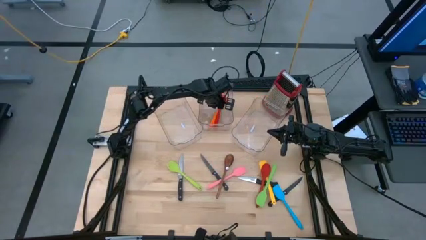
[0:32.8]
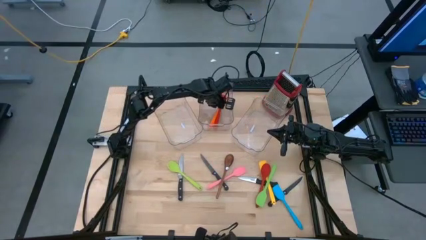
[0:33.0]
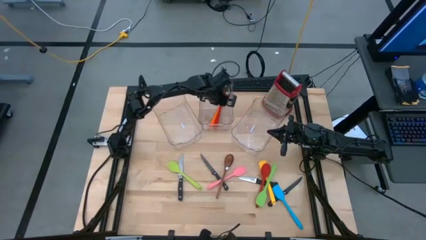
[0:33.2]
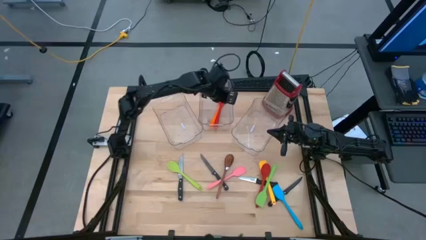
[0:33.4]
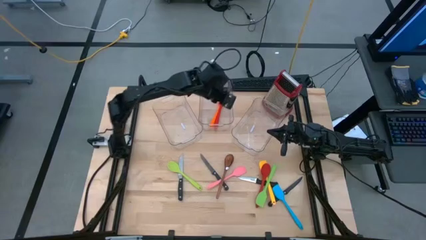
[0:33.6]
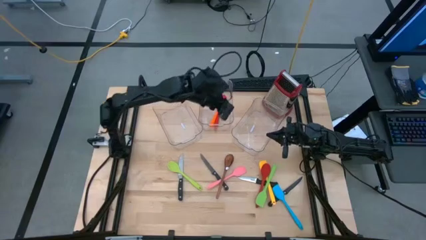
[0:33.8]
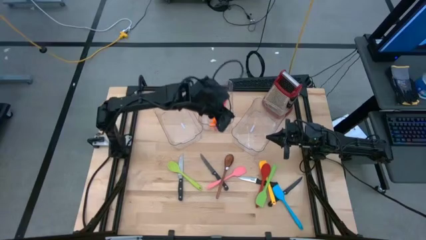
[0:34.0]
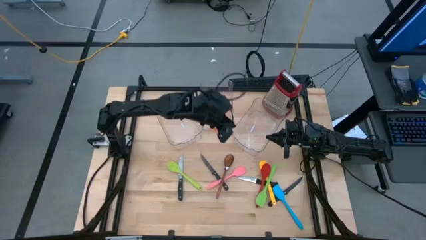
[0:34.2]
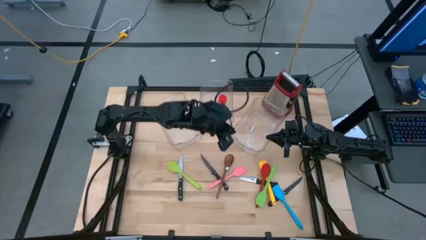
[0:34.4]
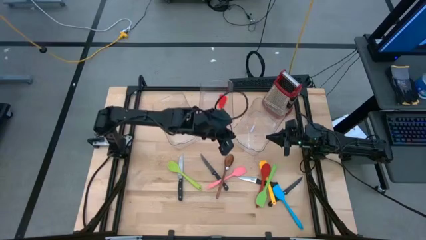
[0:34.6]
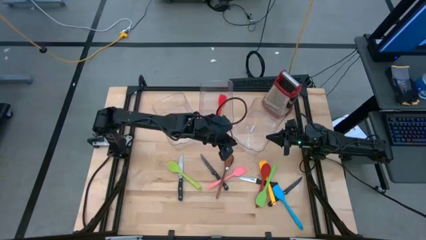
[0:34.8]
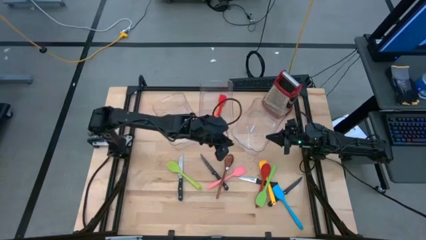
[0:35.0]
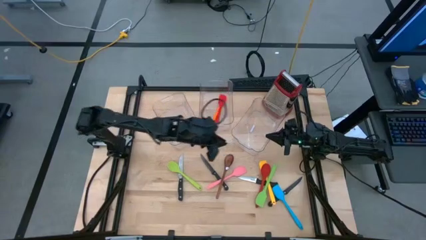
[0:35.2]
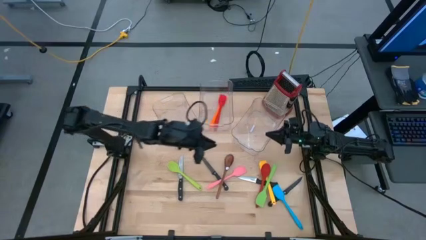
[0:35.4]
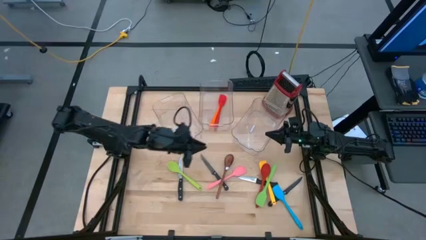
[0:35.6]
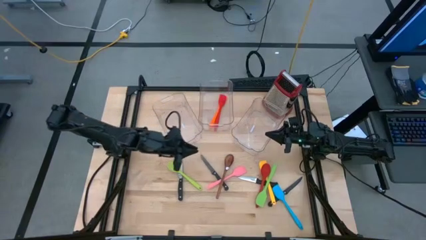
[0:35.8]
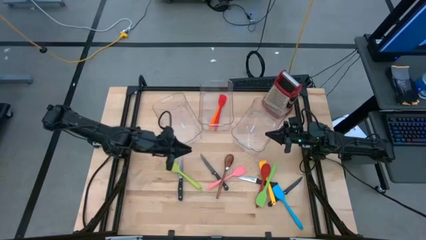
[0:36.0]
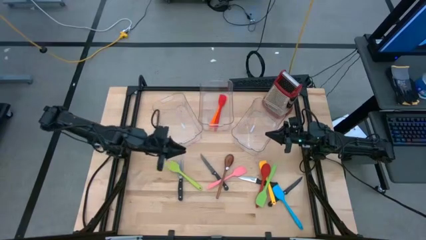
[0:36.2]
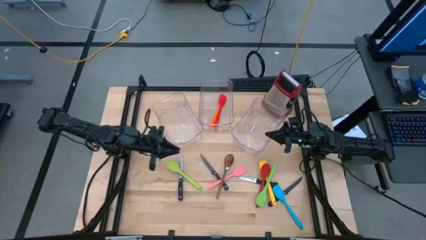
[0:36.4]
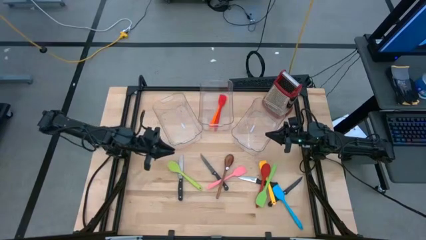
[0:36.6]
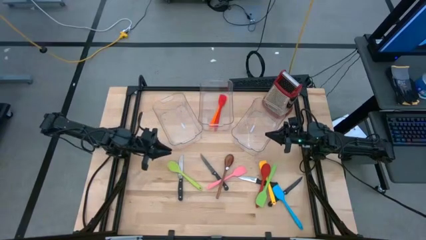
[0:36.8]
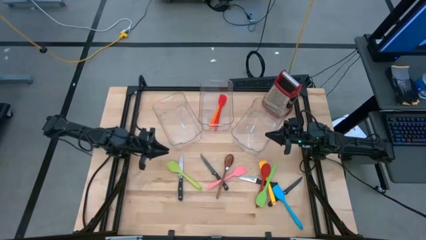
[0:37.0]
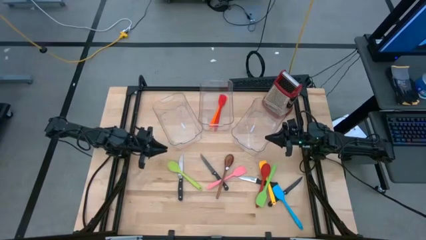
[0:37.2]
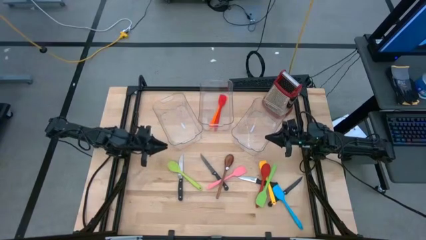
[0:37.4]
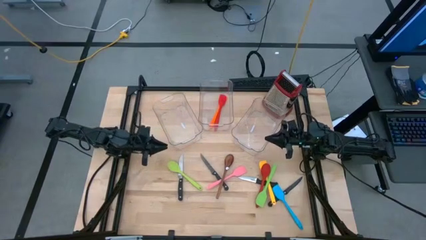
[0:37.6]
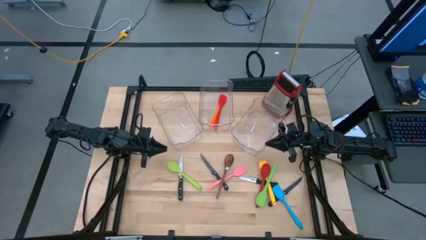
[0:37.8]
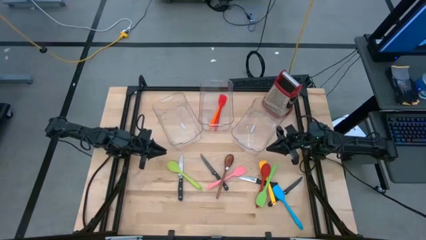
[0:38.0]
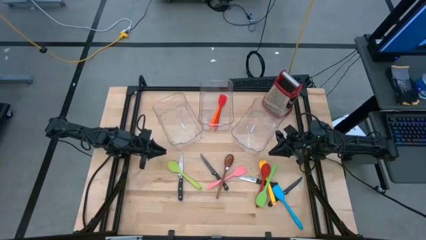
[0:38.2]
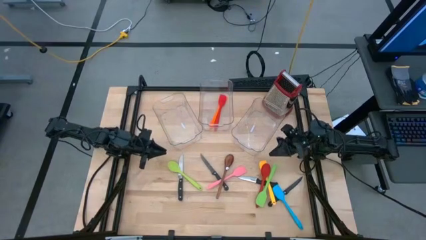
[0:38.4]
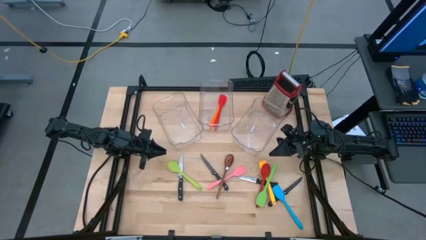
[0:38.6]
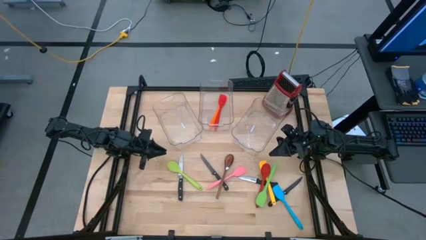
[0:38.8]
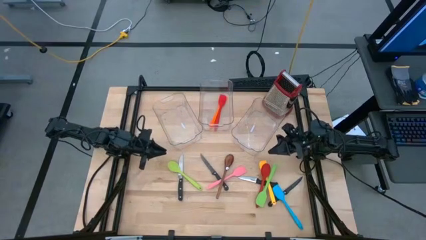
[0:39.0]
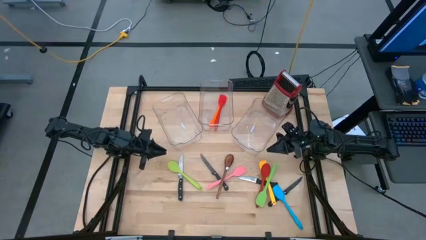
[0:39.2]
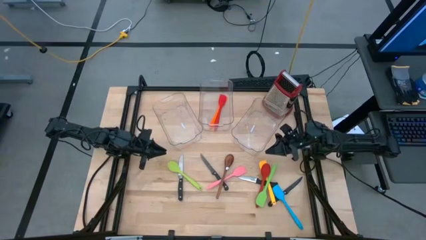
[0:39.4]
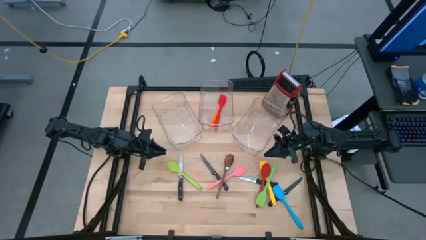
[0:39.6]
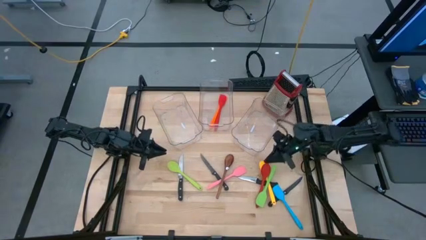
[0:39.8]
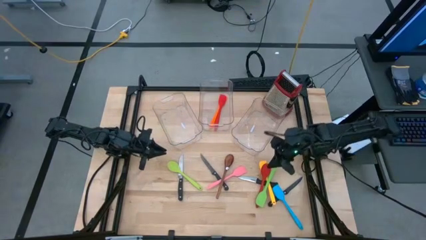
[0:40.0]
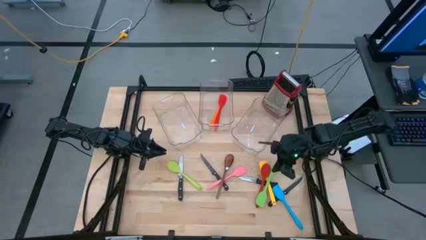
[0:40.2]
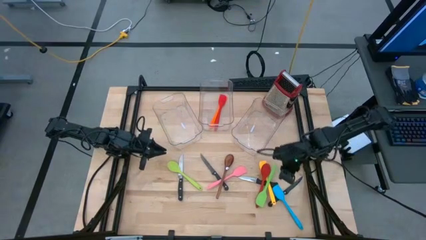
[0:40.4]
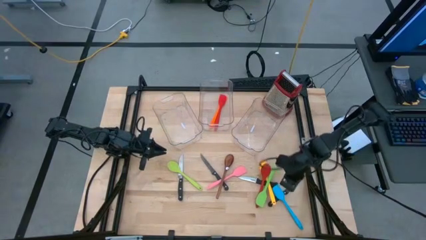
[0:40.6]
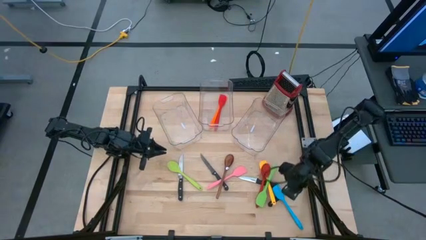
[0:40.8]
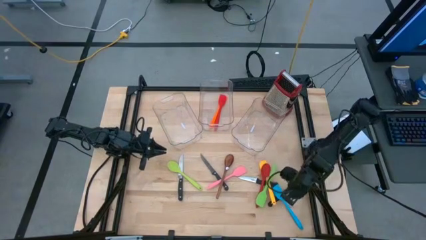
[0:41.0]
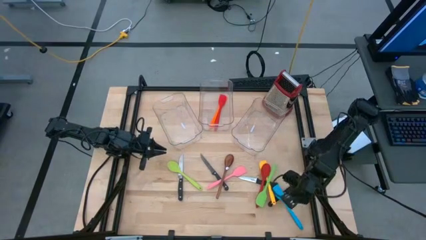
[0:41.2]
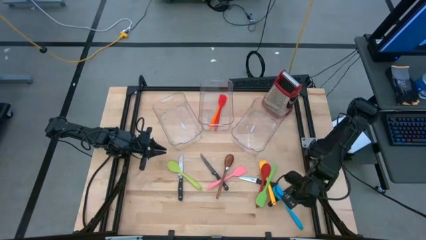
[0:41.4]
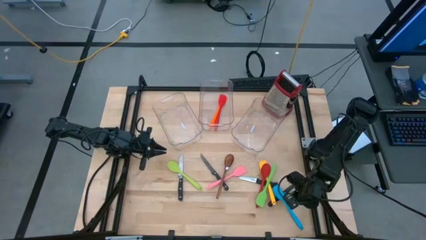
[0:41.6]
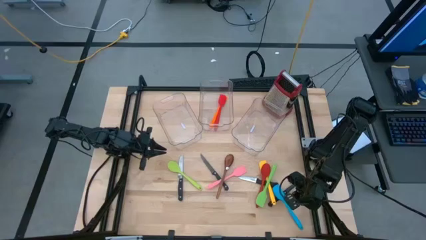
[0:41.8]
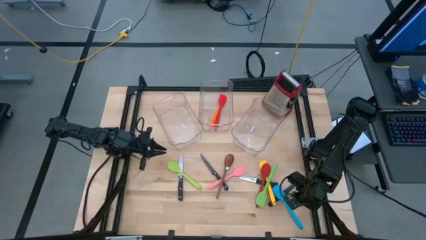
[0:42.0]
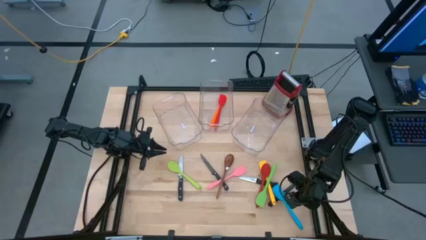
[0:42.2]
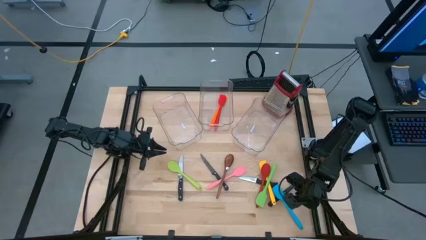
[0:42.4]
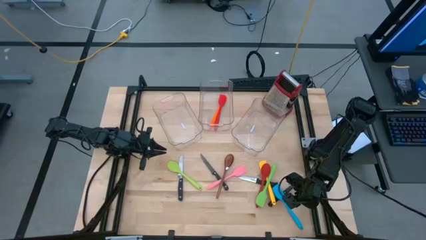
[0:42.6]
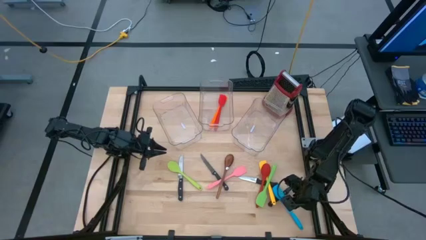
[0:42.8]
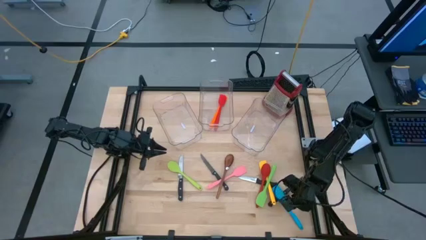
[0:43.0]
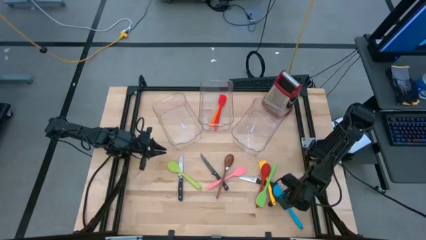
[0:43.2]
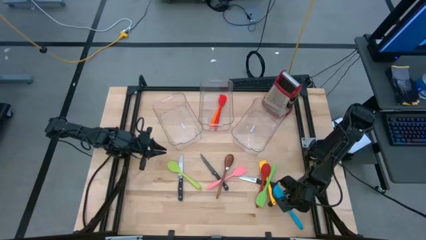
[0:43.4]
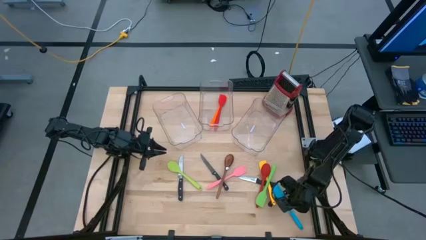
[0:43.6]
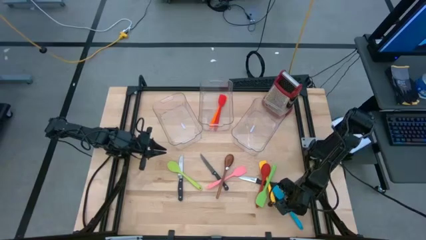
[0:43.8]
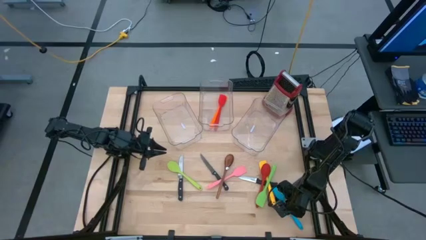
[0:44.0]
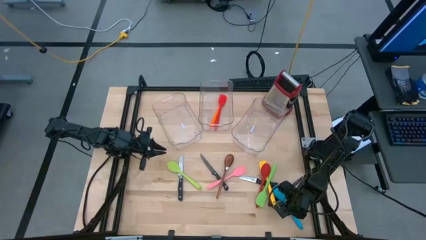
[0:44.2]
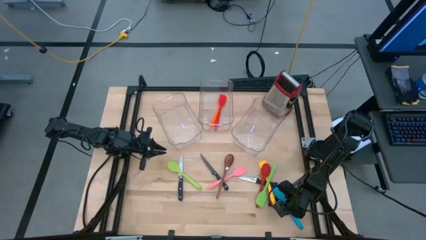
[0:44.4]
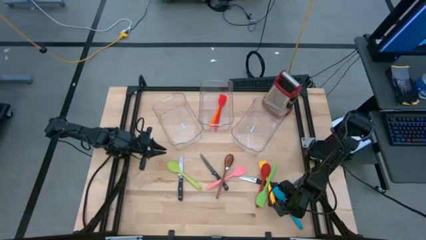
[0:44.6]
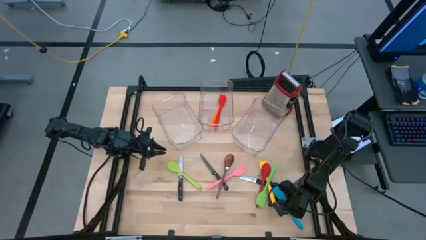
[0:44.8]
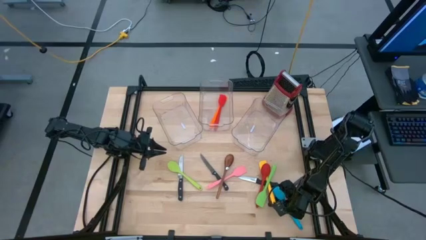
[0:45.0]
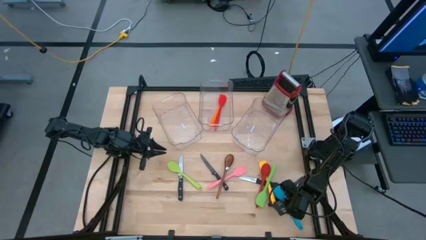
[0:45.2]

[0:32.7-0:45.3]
Task: Pick & Place Kitchen Items
Put the blue spatula in the middle bin

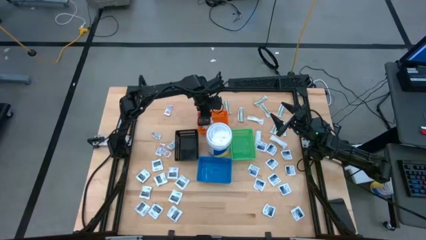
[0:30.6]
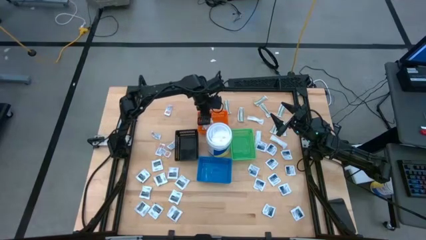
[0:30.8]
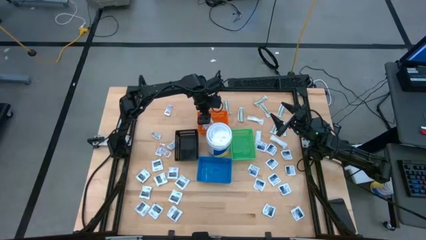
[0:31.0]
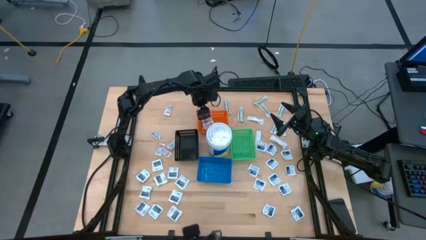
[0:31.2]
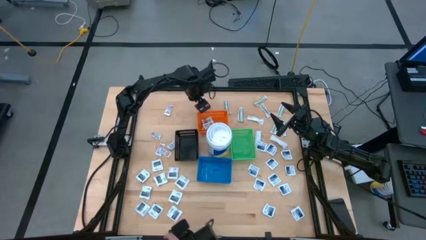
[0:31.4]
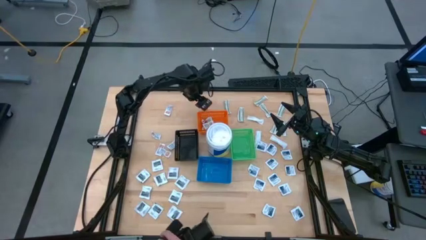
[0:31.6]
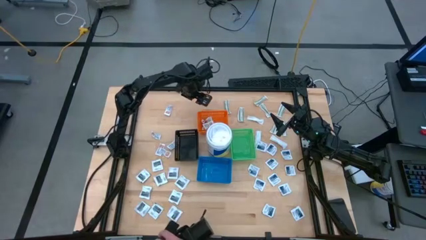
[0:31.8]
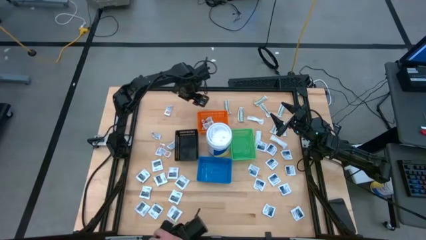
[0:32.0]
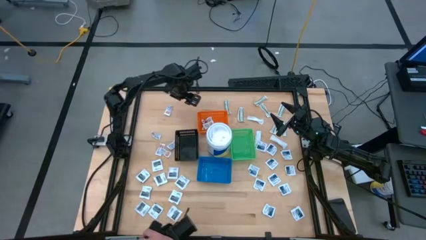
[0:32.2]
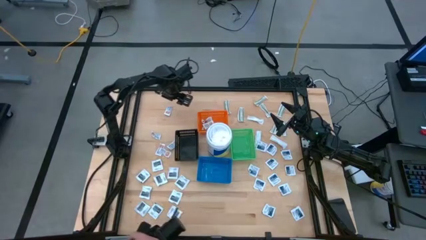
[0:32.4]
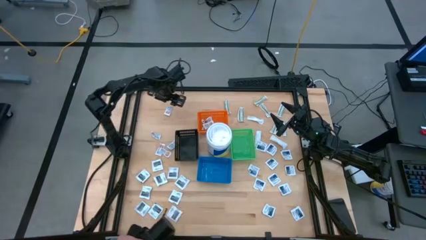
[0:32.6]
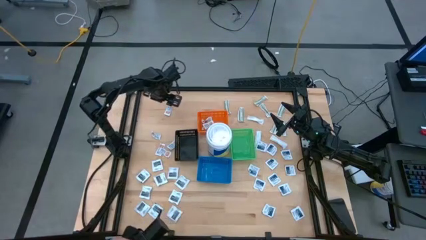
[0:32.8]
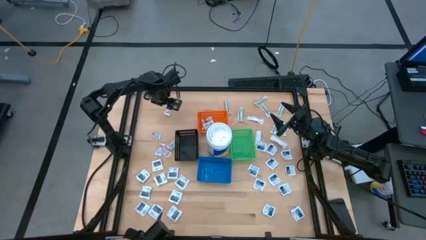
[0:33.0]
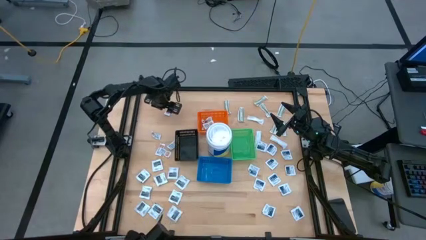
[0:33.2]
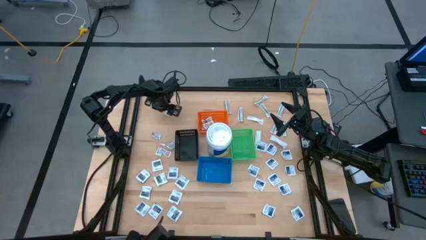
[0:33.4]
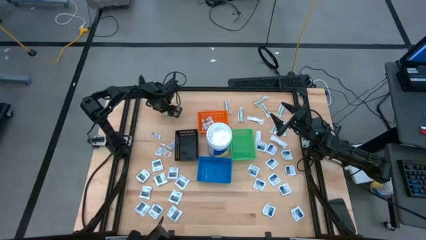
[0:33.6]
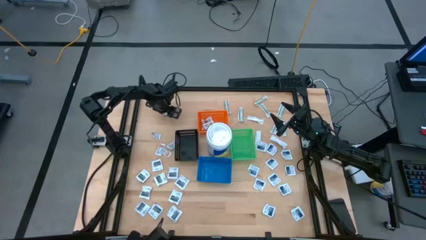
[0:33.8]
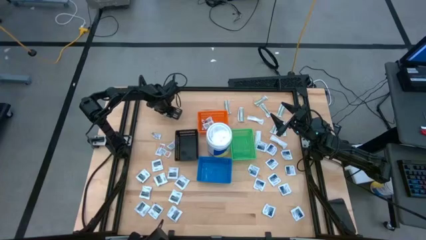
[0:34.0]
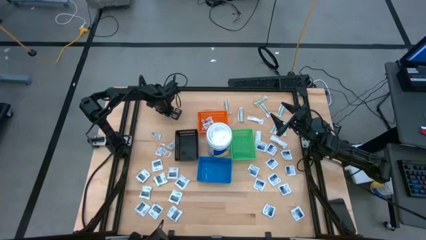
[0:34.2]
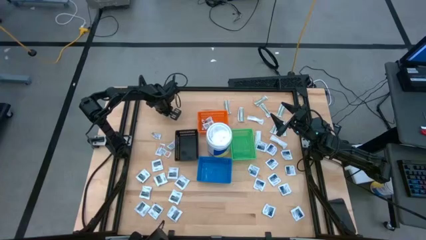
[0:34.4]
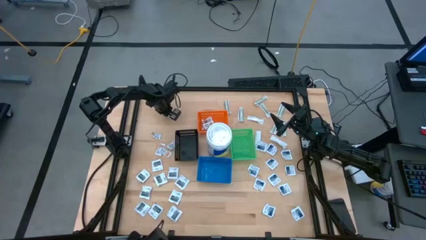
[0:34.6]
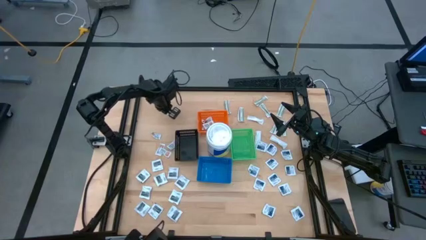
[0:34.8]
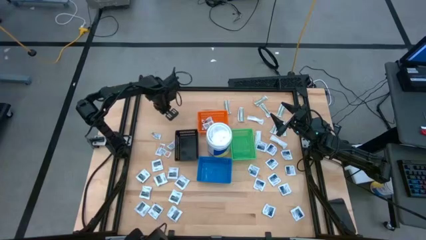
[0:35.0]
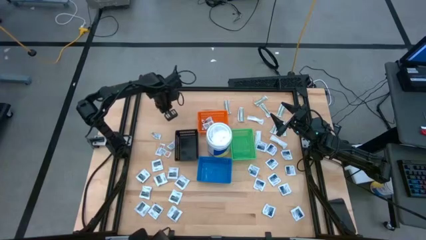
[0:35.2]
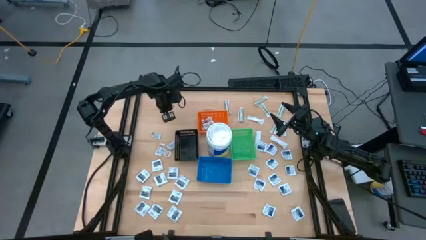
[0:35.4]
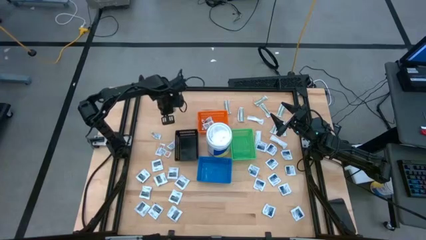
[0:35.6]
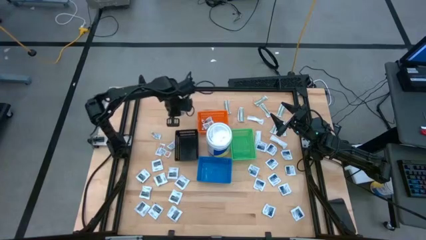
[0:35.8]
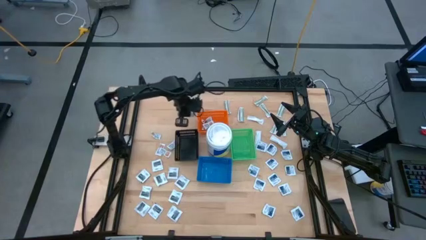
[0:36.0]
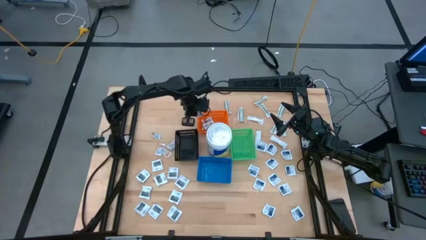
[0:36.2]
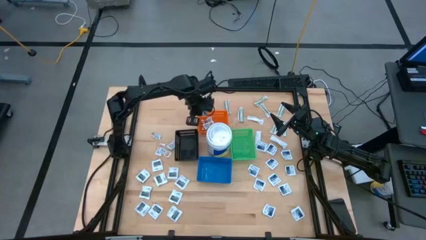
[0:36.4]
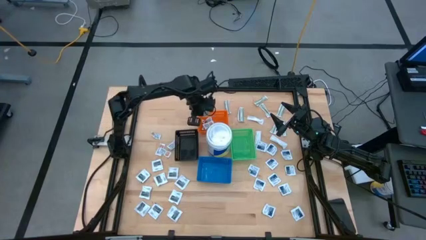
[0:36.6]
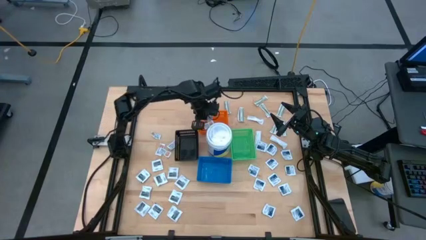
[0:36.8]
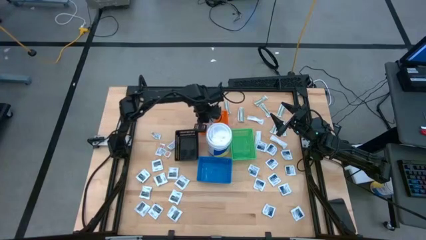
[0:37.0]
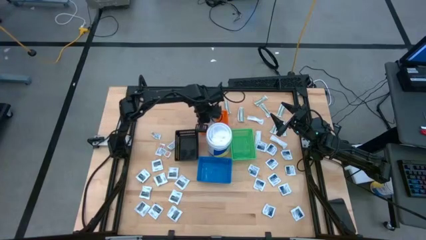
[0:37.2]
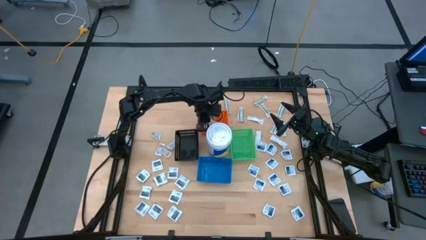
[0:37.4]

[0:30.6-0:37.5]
Task: Pick & Place First Aid Supplies
Put the orange ointment pack into the orange bin
